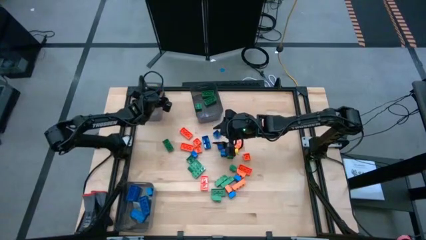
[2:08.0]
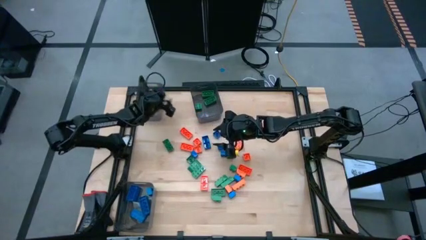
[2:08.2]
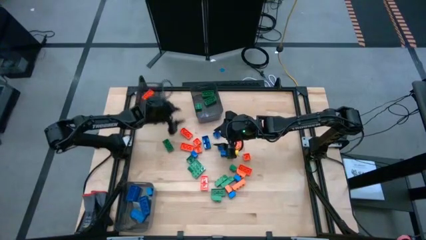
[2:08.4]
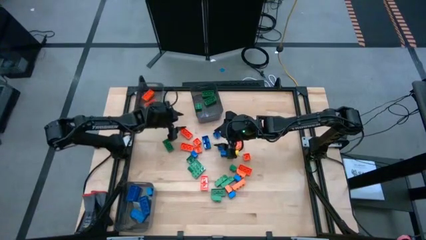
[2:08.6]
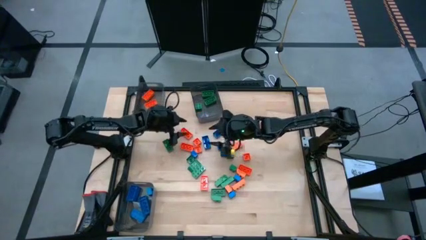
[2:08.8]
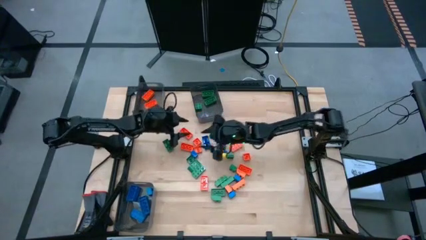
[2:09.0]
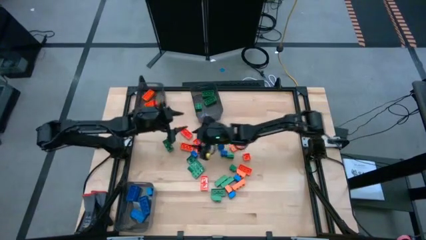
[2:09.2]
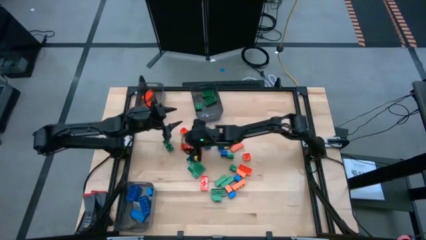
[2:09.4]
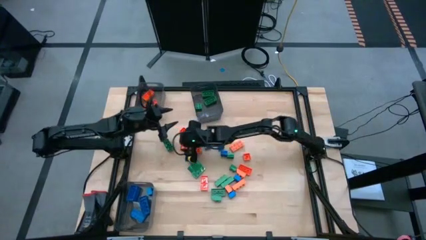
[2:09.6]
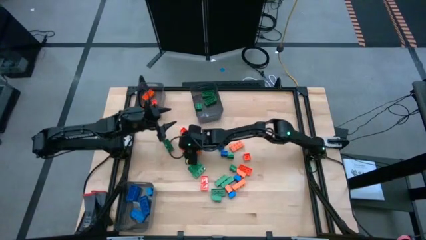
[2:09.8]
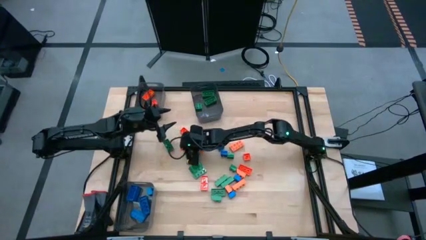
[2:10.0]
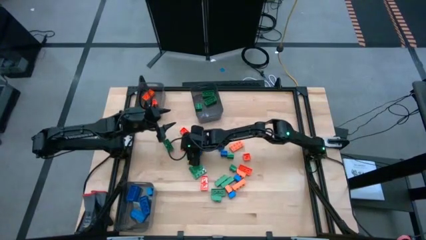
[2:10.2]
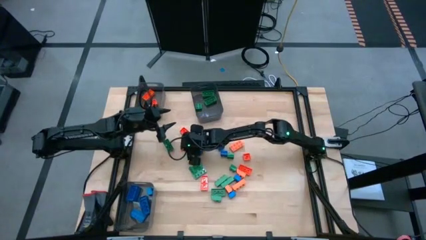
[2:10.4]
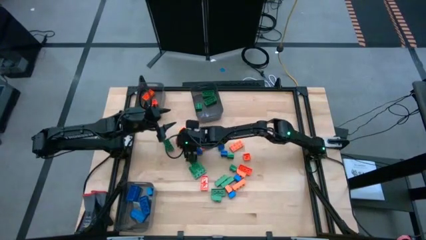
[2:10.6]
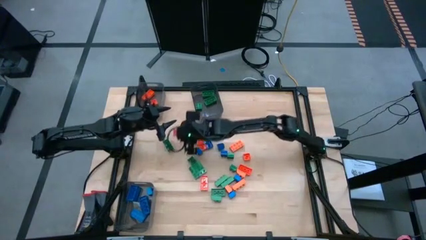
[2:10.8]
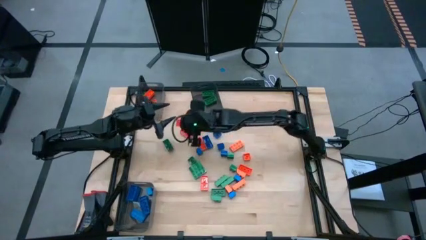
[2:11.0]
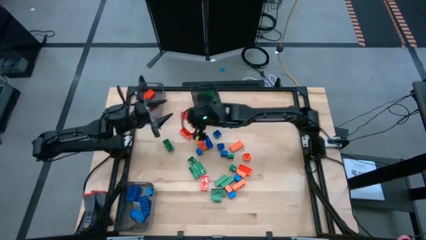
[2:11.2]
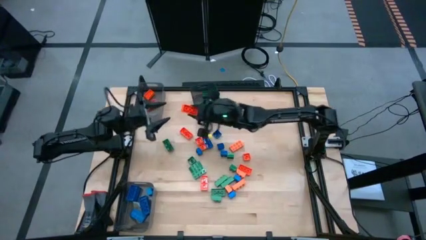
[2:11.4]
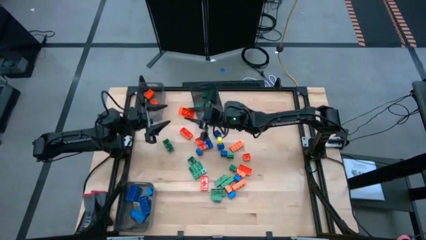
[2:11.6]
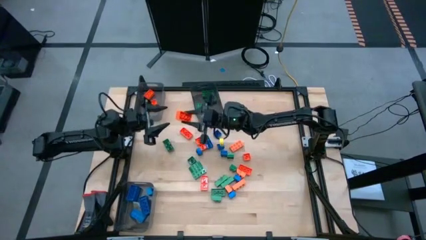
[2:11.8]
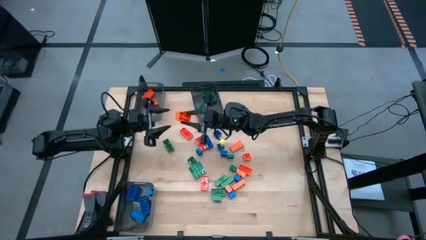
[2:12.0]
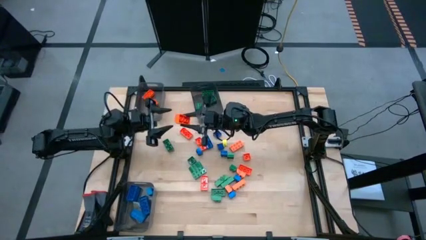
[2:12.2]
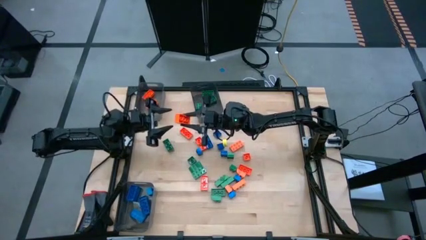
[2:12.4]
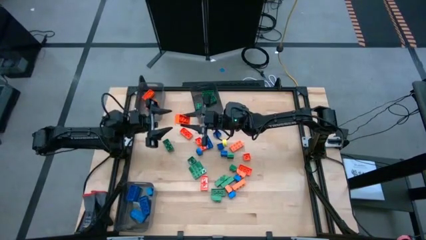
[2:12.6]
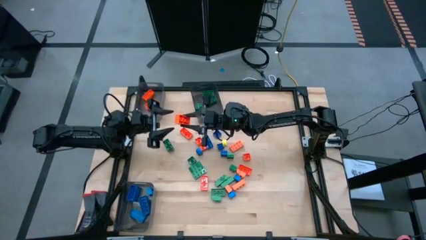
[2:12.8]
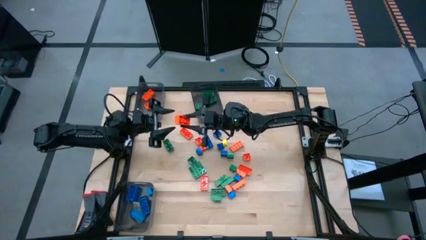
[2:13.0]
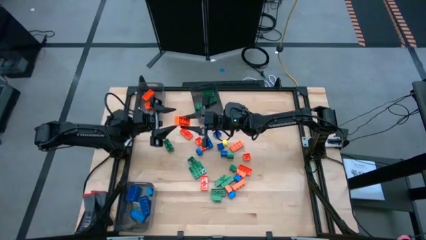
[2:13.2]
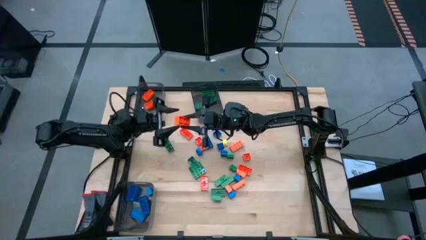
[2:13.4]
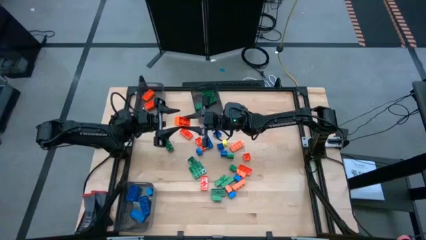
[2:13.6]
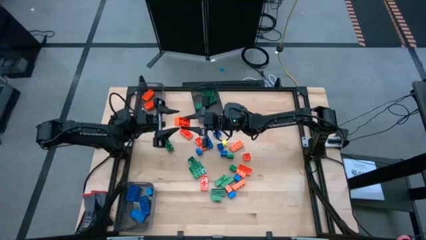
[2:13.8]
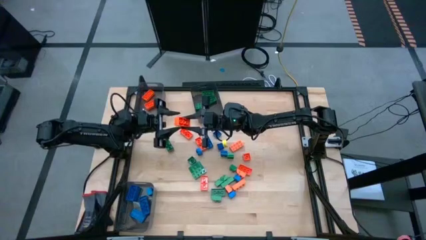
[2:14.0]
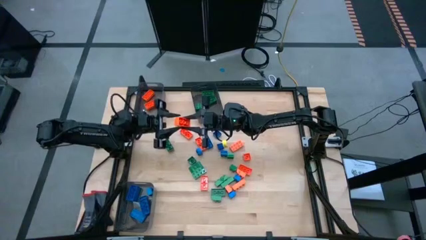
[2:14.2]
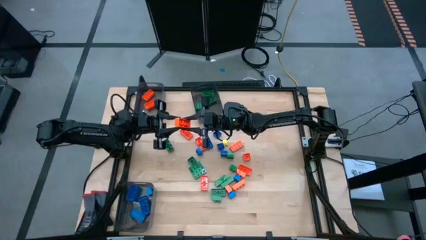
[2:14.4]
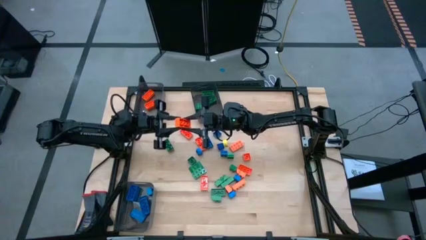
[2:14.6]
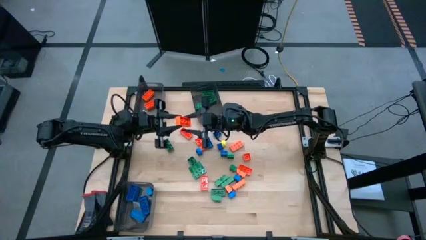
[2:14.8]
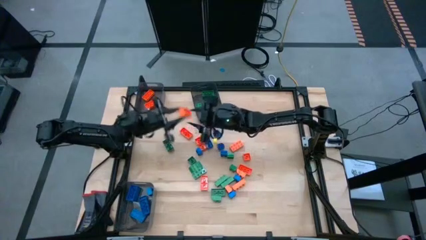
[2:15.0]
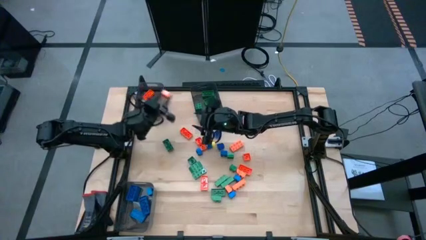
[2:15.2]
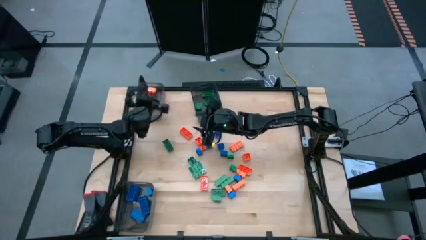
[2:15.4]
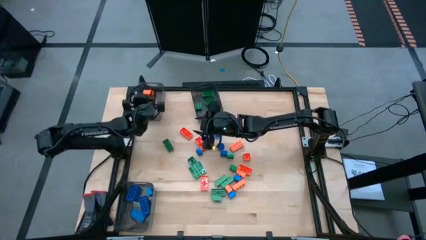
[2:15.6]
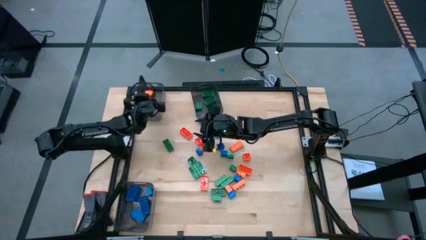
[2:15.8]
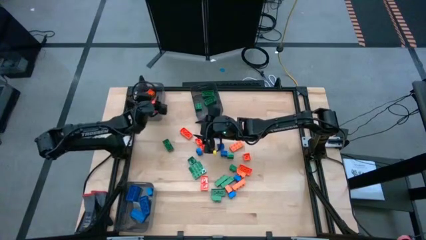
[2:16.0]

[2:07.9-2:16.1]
Task: Sort blocks
Put the orange game piece into the top left black transparent bin

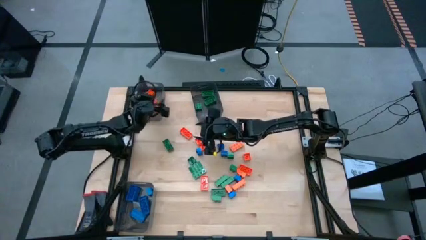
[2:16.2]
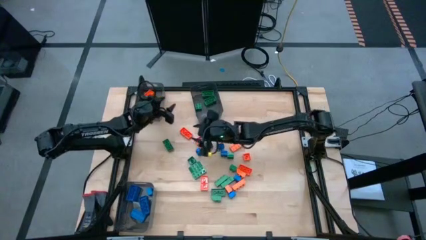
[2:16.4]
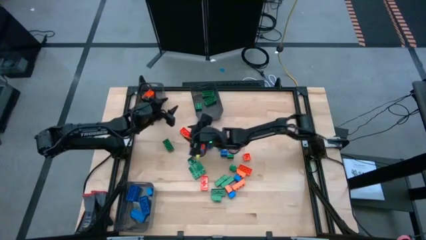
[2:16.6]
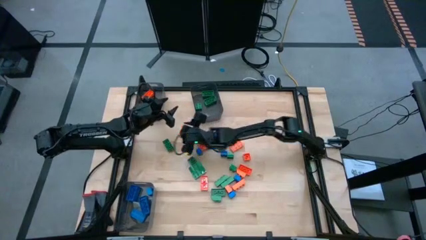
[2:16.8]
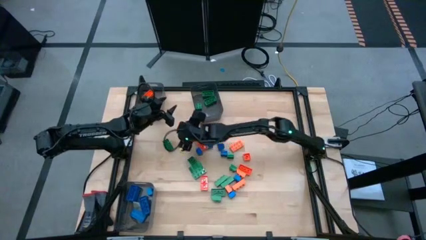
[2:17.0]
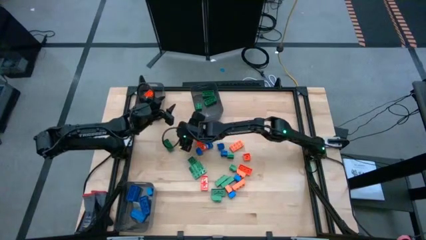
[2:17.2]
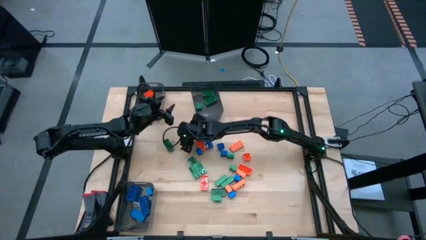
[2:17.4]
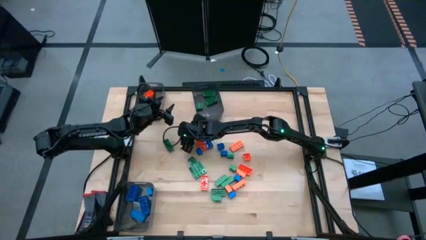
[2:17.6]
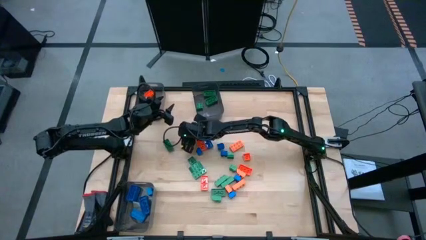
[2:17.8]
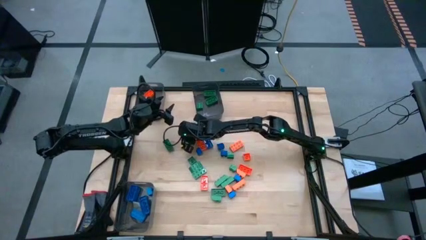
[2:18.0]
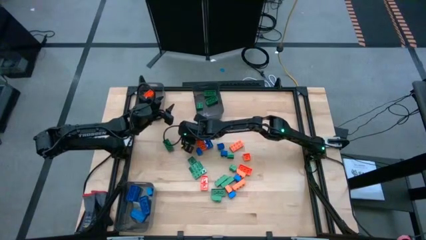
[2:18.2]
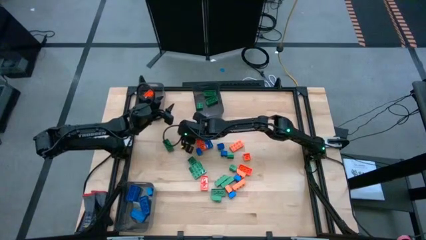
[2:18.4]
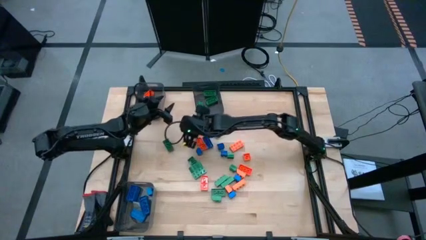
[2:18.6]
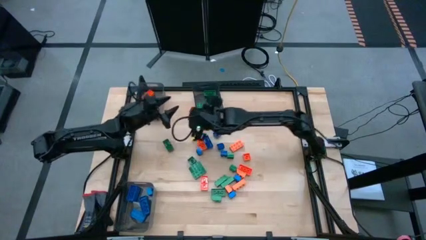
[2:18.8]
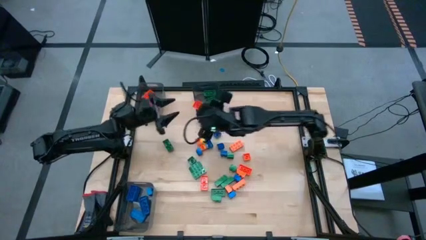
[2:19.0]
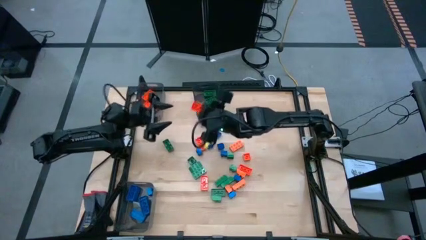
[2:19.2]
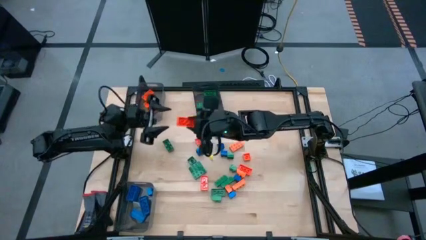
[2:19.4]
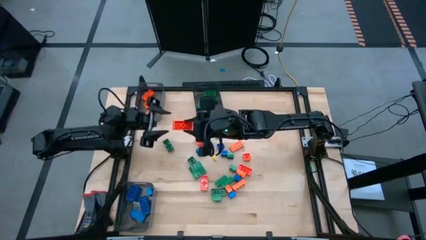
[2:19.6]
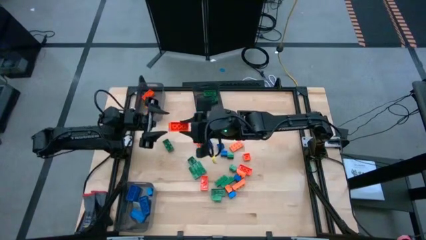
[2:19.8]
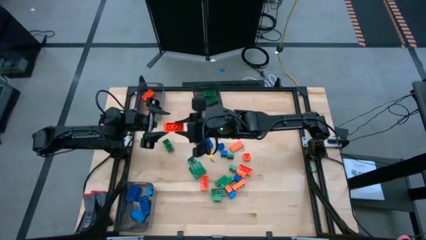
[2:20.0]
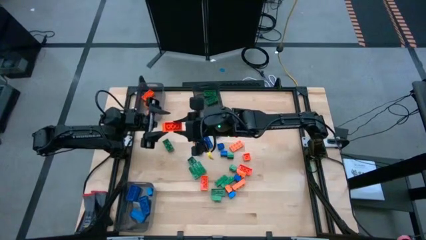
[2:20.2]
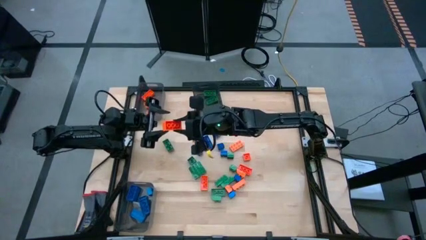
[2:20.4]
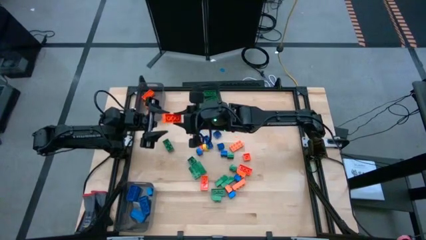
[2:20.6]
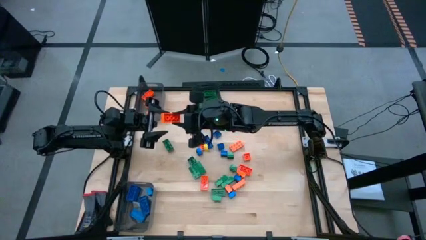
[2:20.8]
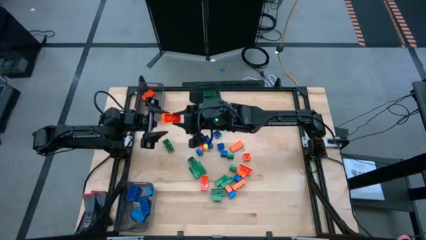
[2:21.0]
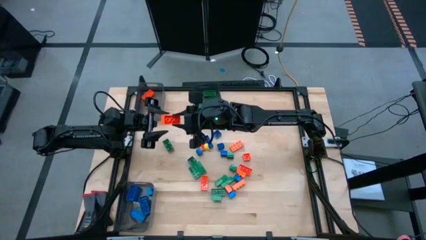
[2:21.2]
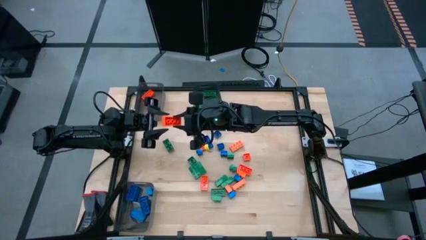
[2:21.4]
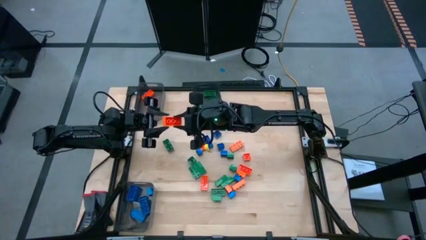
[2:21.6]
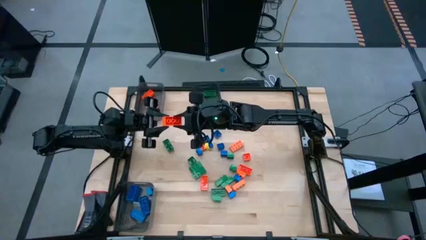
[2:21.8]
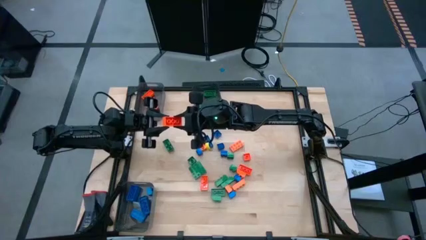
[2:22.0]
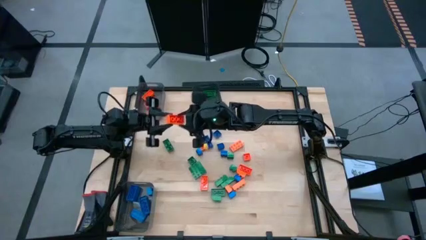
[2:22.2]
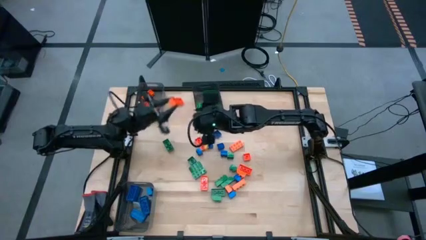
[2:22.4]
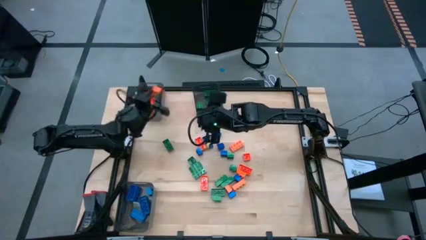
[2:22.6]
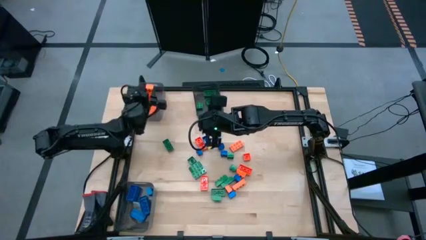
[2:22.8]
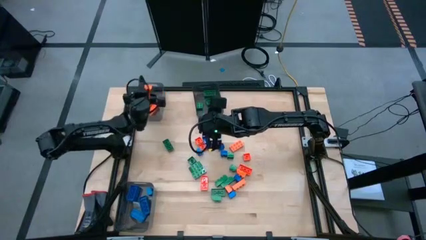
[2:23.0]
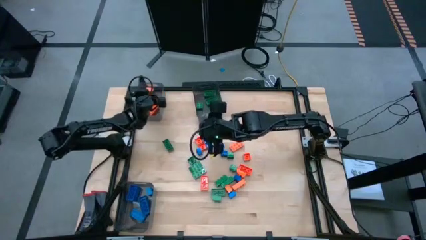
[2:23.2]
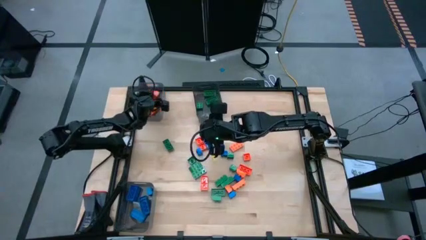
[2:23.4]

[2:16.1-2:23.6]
Put the orange game piece into the top left black transparent bin

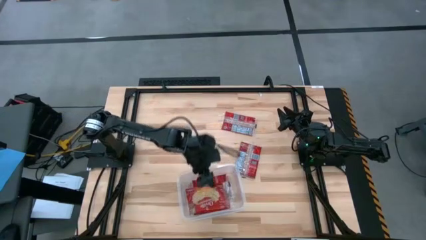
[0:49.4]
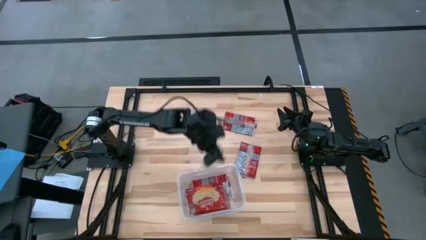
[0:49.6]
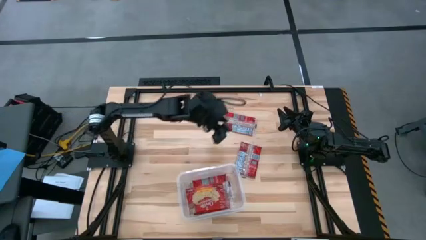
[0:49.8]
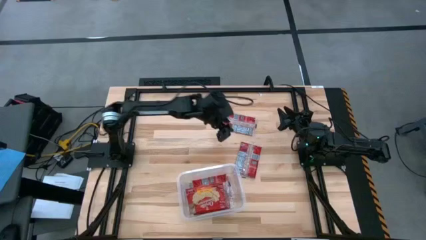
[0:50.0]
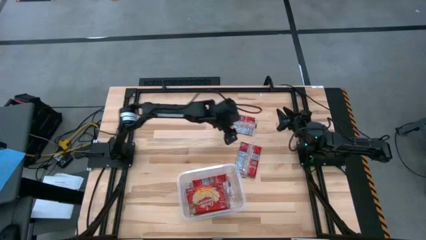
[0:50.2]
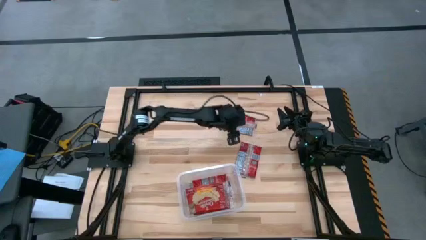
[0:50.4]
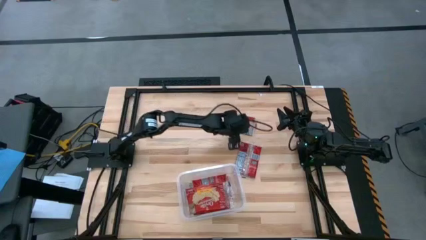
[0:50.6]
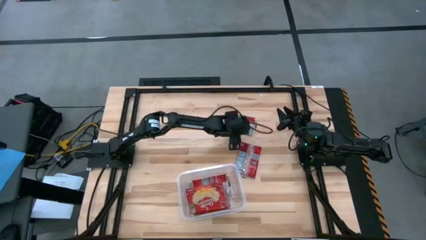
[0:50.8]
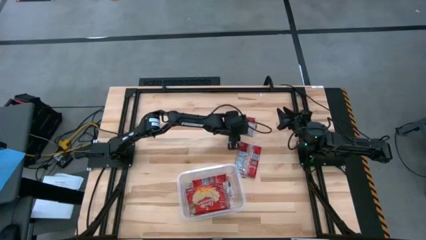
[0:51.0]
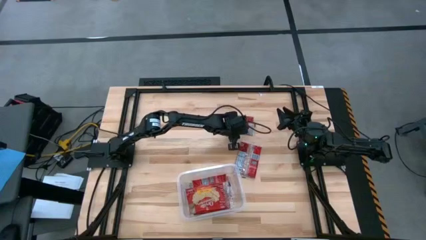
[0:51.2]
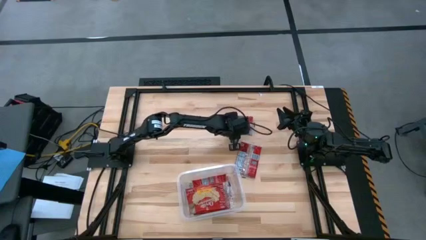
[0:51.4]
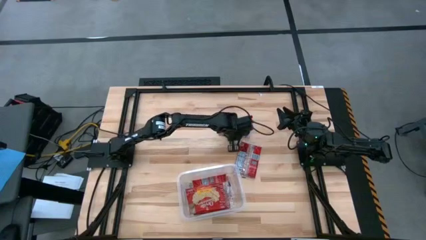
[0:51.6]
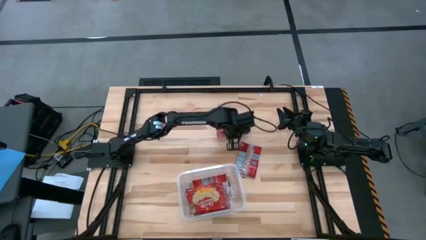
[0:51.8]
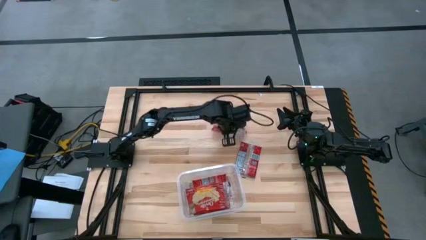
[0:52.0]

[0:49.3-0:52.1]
Task: Sort popcorn bags into baskets
Put the red popcorn bag into the transparent container
